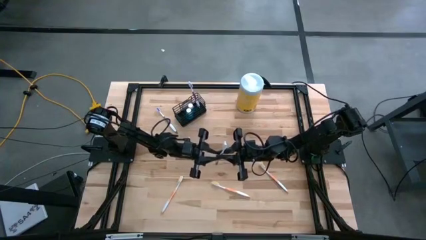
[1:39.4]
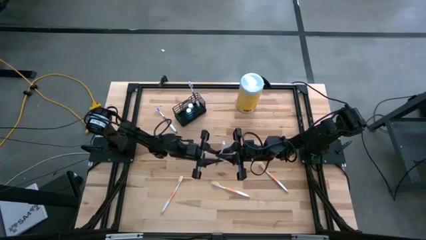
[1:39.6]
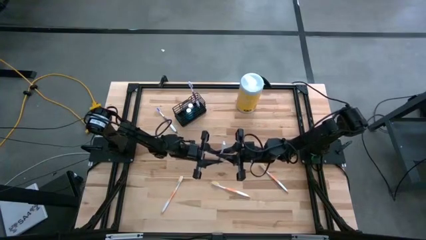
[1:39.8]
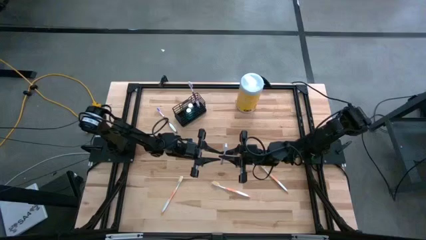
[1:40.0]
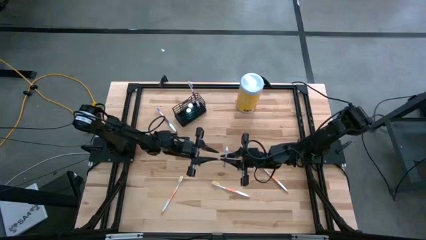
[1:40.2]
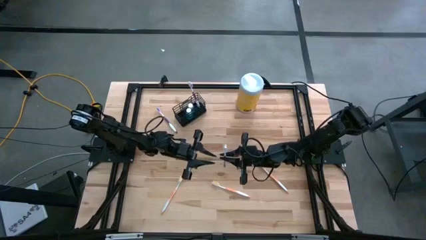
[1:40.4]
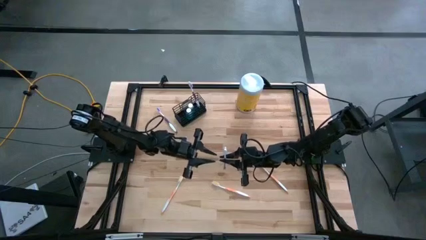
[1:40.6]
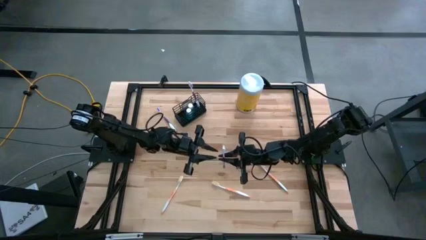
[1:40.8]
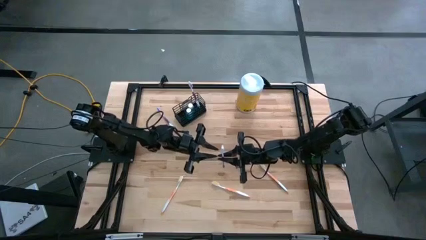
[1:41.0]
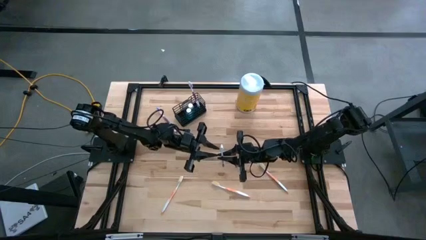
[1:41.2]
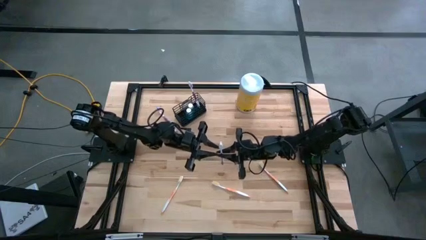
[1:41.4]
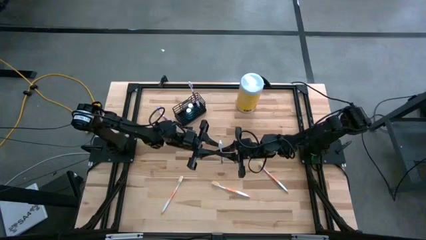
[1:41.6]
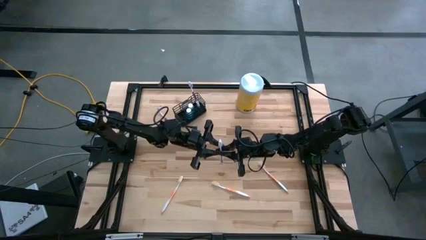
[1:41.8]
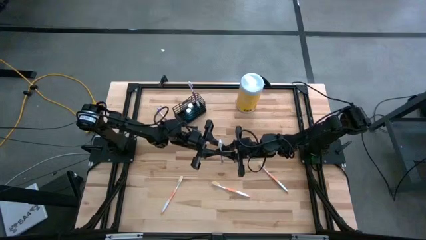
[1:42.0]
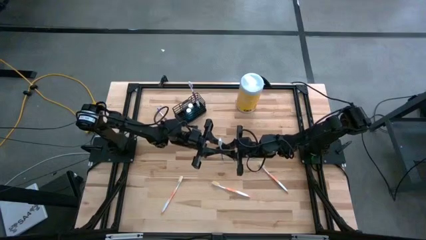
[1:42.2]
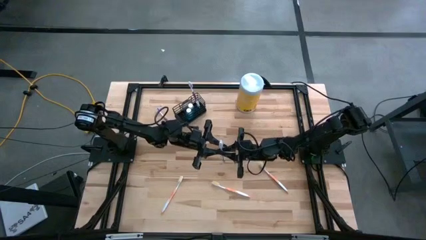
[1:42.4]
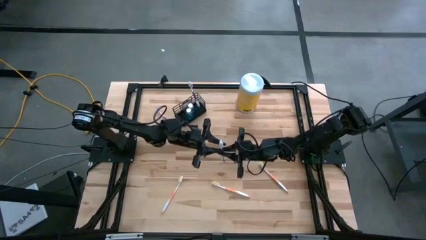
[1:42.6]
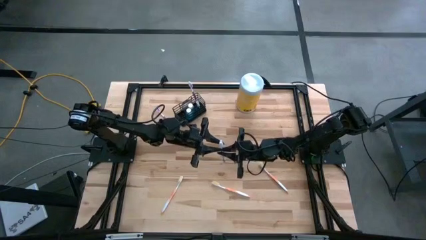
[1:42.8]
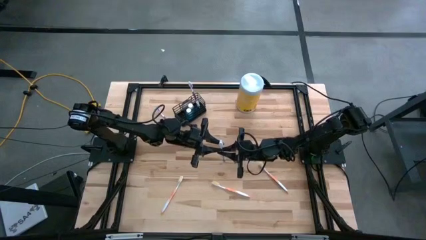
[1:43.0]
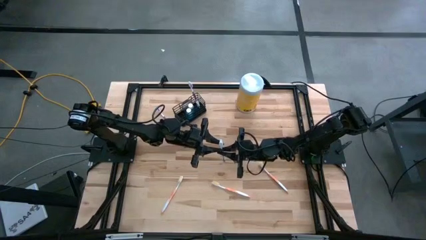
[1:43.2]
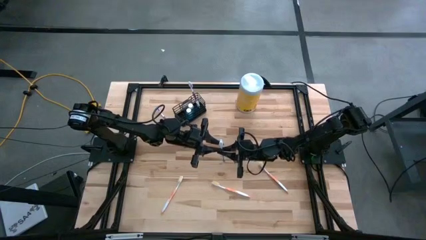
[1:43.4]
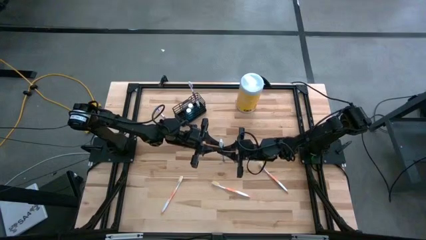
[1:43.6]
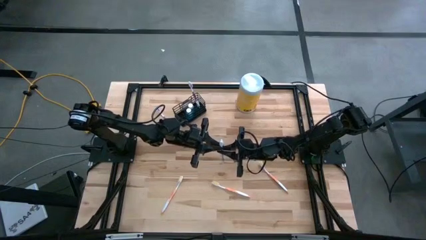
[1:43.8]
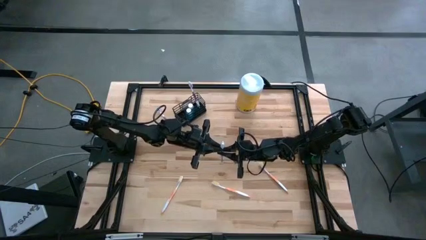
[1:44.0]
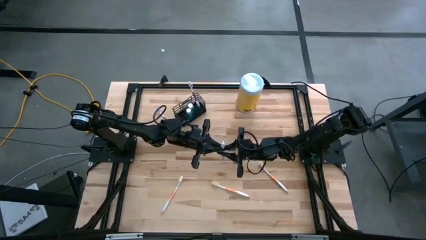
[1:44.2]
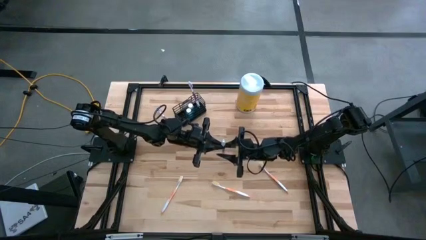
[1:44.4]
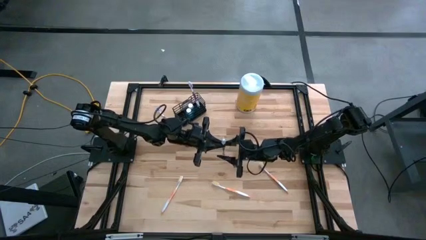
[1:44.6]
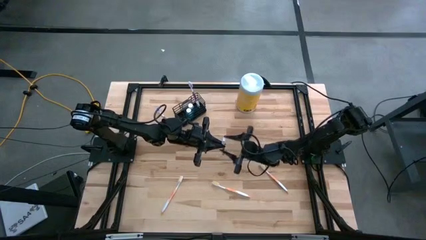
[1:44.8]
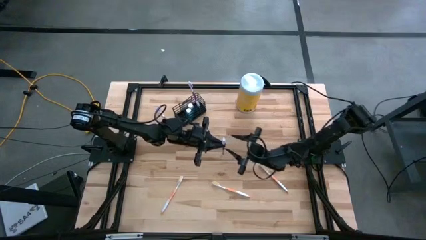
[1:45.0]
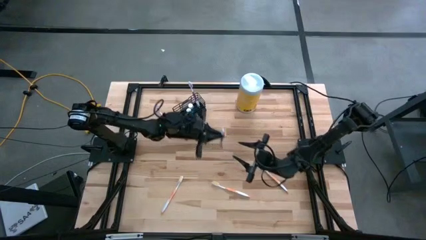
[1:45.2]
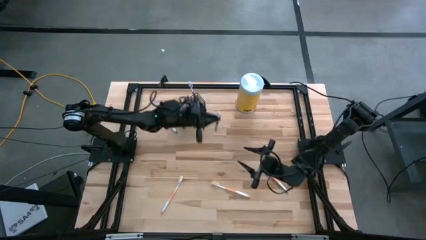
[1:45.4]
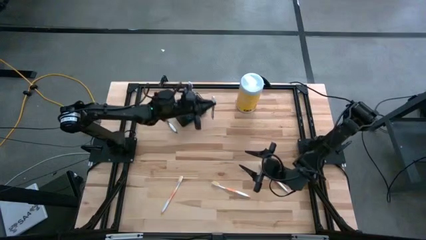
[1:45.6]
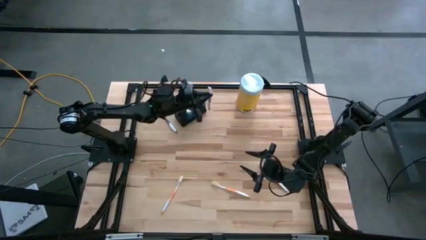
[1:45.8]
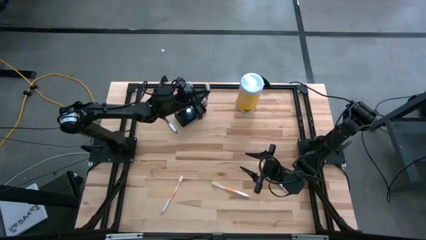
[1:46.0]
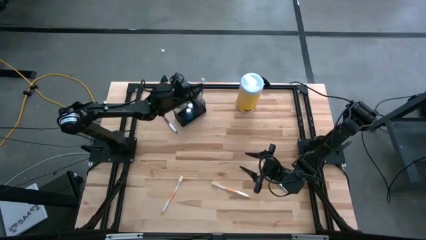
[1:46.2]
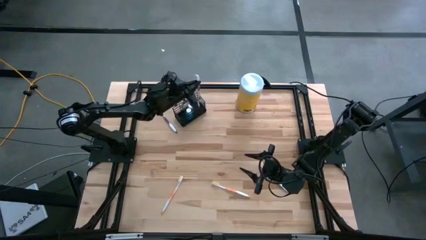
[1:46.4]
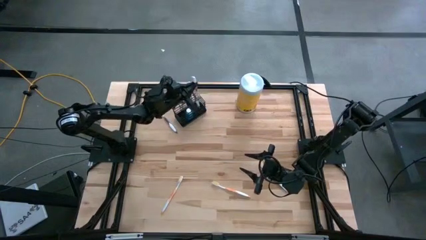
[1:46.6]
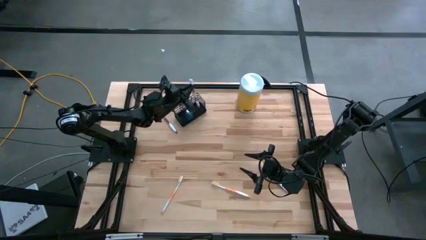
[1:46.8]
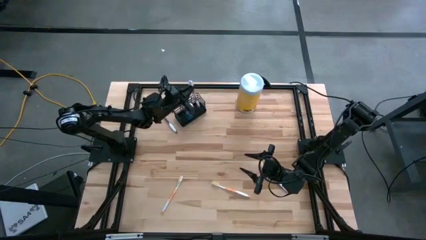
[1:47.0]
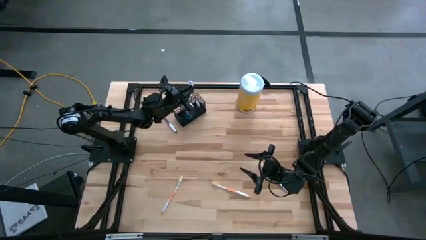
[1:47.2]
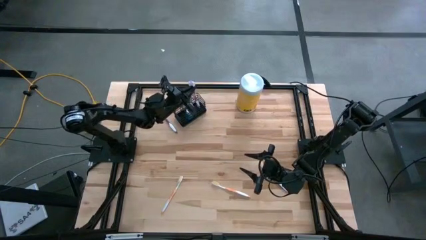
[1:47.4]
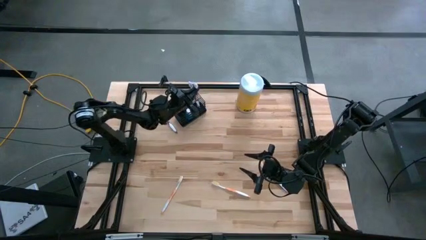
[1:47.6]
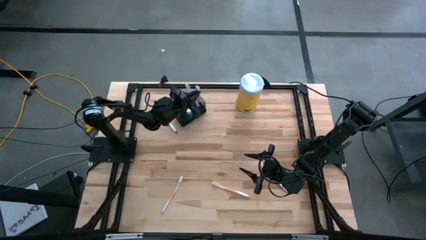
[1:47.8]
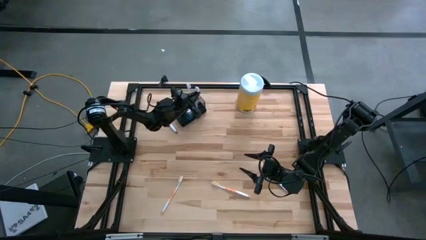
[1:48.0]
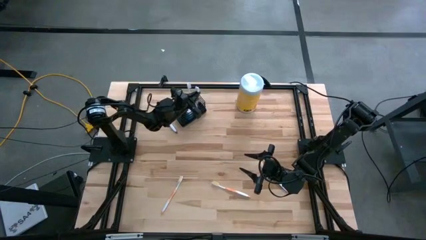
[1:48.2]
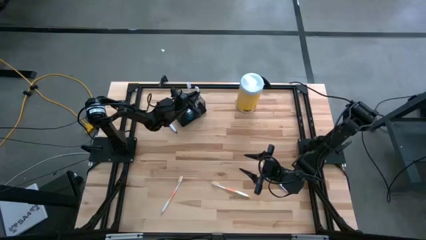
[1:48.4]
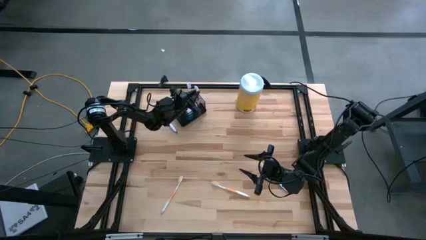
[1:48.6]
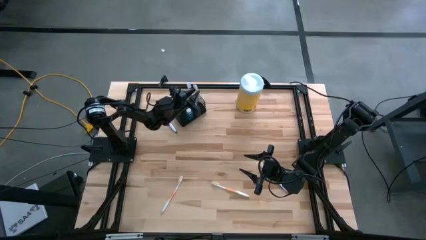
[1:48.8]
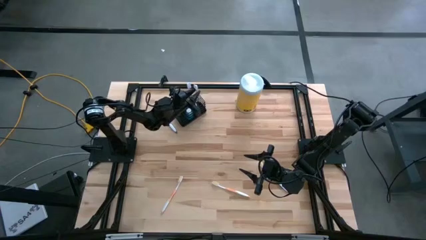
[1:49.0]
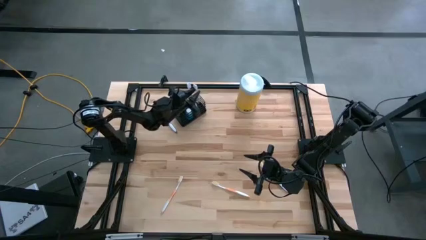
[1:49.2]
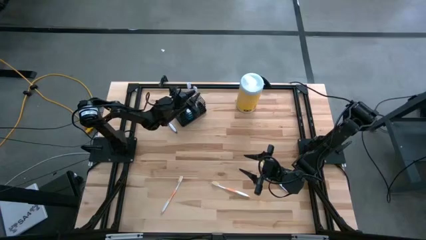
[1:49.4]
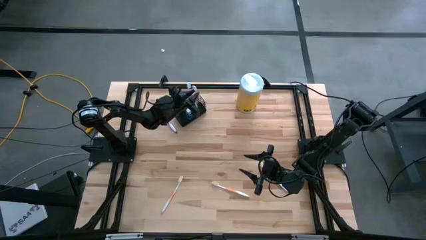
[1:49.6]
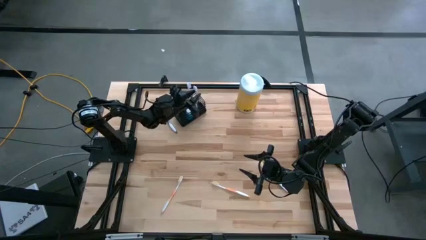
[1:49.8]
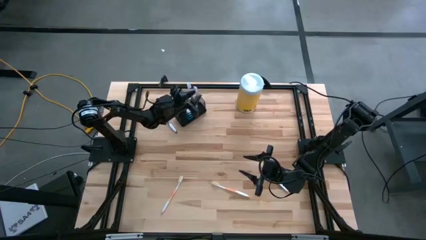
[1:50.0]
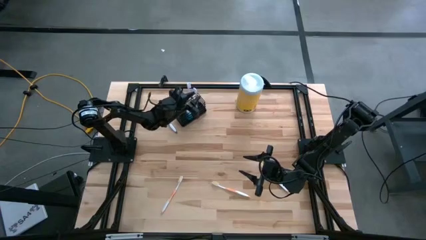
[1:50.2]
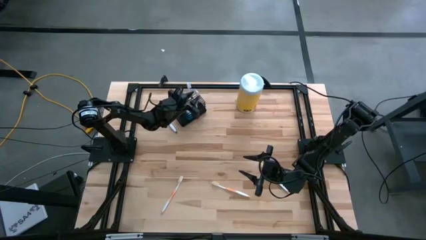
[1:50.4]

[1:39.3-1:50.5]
Task: Pick & Place toothbrushing station
Put the bottom purple toothbrush into the right section of the wire organizer

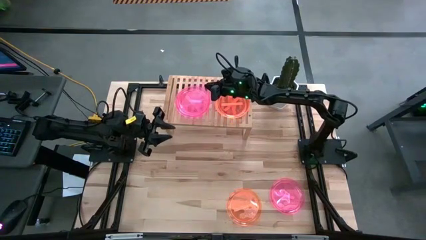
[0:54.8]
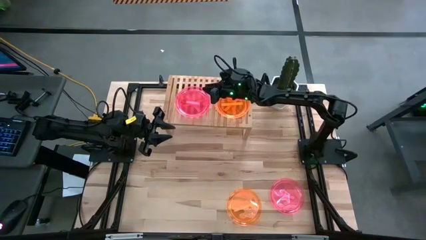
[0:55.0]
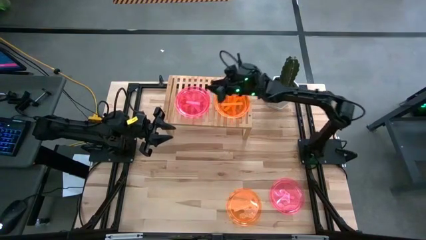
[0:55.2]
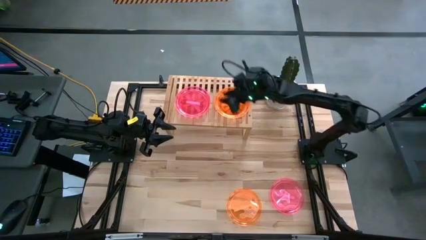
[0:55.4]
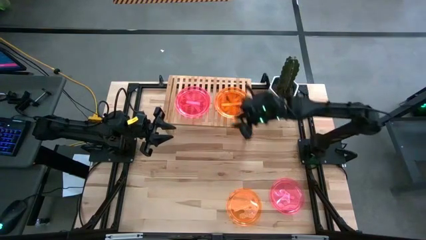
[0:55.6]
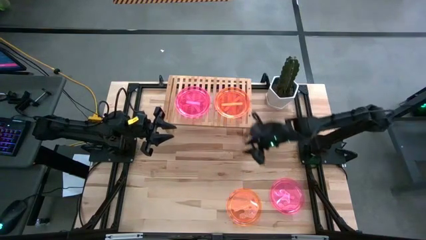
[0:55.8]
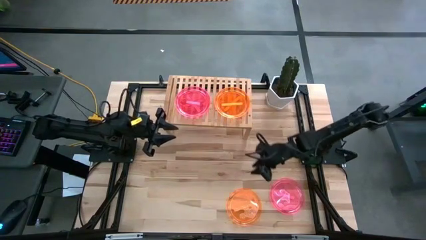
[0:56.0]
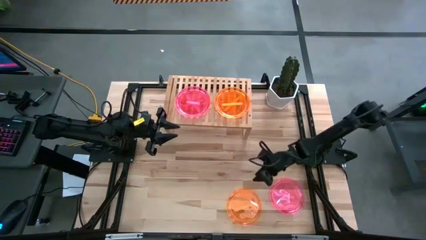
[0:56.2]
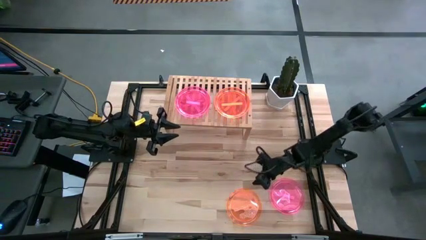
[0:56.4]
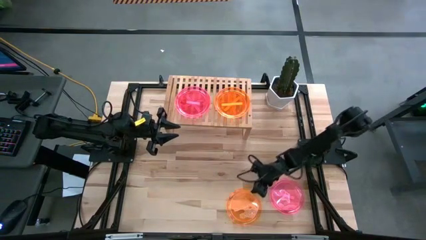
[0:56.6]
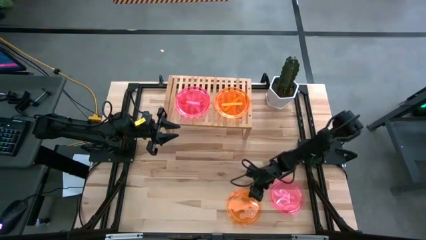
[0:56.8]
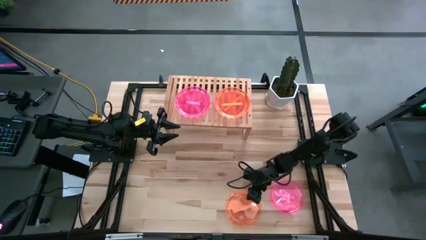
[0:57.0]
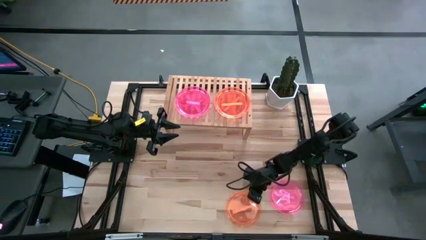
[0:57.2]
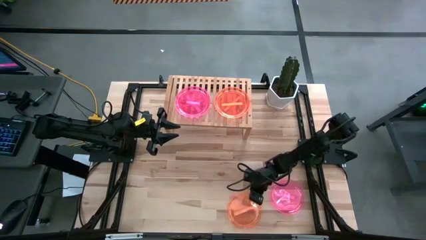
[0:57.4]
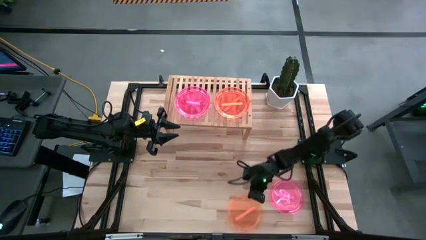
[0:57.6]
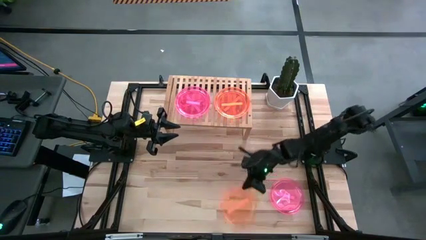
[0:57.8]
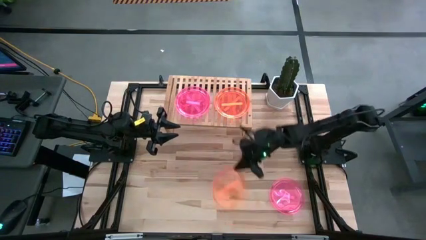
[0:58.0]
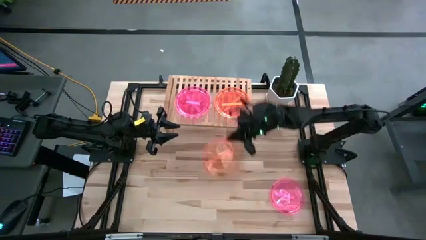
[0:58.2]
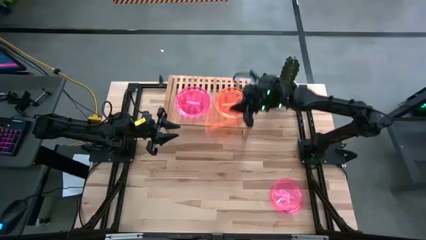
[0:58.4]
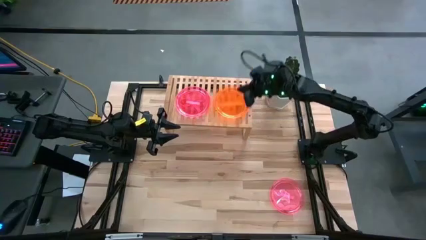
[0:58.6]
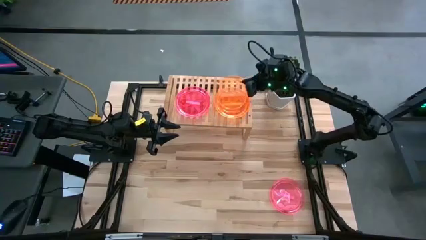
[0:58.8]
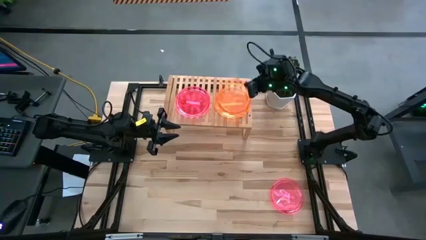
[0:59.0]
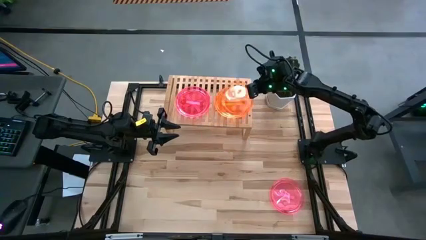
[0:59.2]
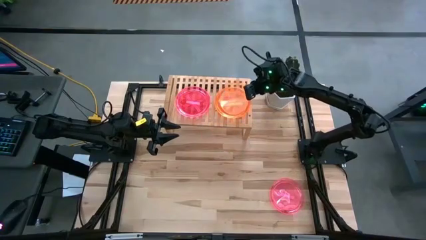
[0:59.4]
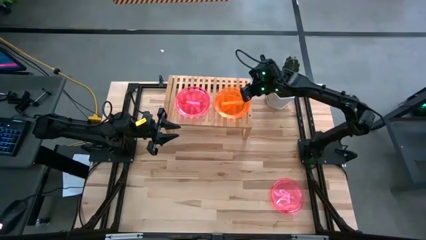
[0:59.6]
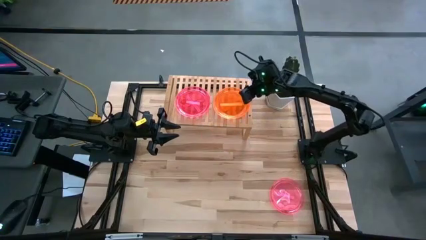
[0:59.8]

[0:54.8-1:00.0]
Task: Place and stack plates onto a shelf
Stack the orange plate on top of the other orange plate on the shelf
